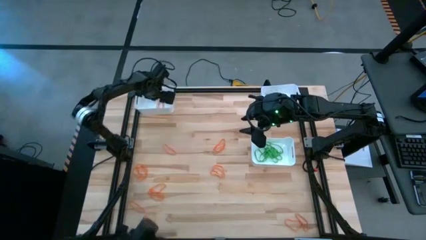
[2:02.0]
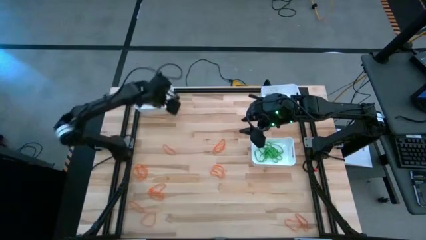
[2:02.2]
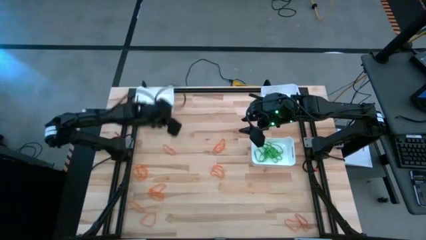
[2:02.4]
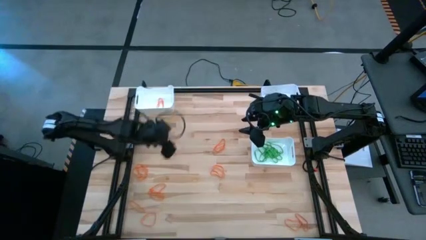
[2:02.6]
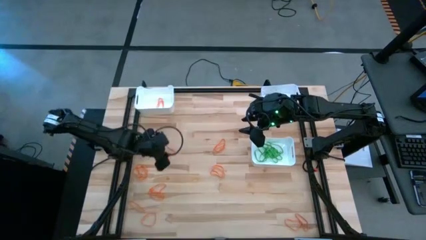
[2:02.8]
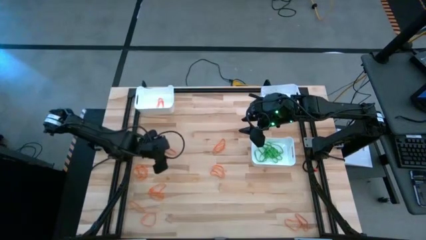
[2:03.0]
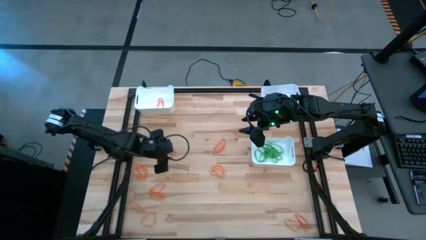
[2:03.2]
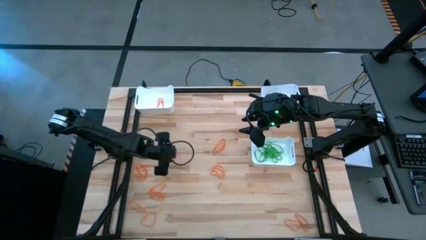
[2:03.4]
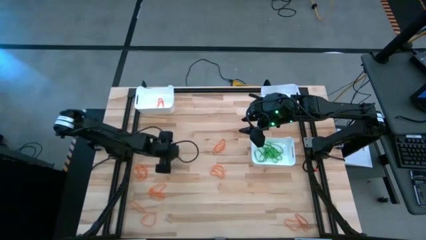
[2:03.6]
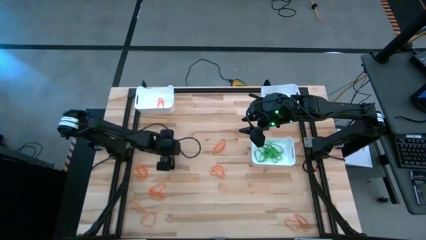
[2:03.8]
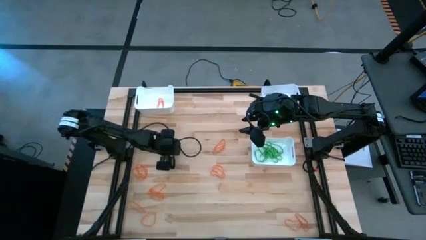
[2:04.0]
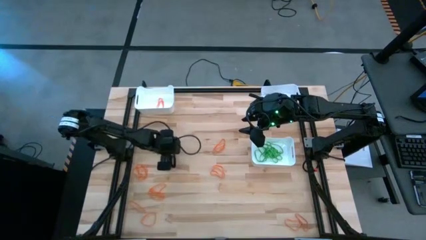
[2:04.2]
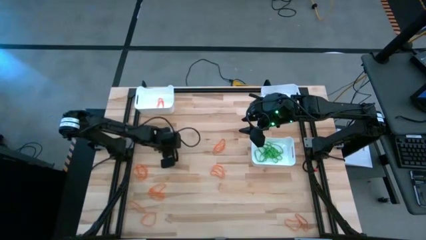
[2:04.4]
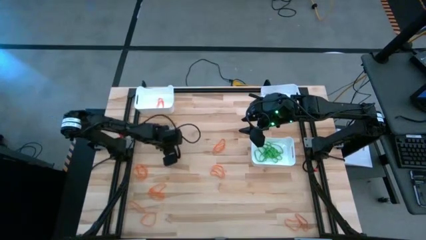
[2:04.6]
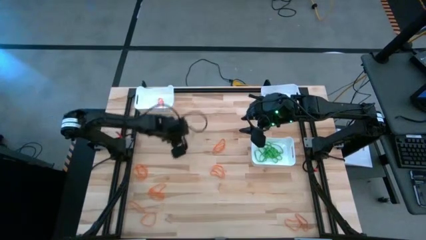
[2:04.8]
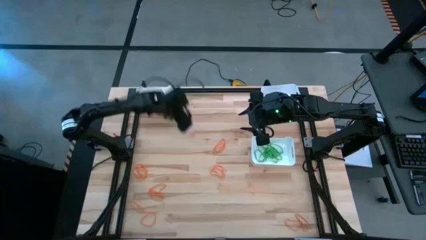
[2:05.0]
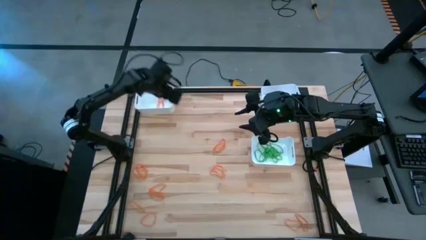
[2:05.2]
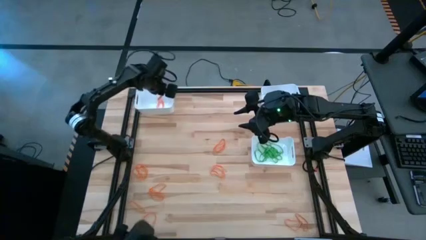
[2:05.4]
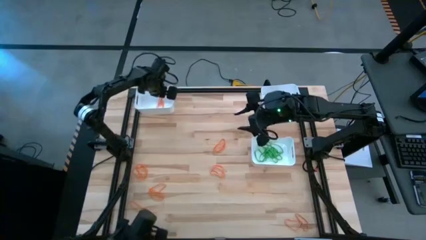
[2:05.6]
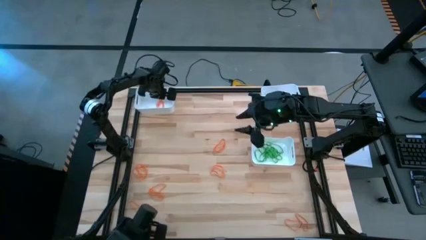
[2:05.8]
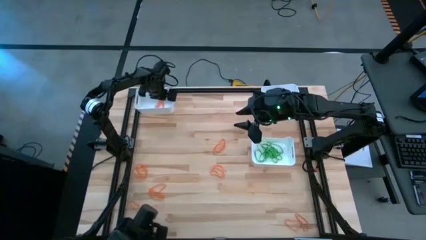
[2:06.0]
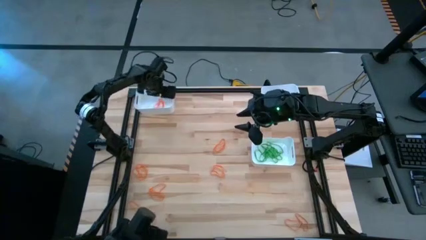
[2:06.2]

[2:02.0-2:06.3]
Task: Sort rubber bands into baskets
Put the orange rubber band into the top left white bin

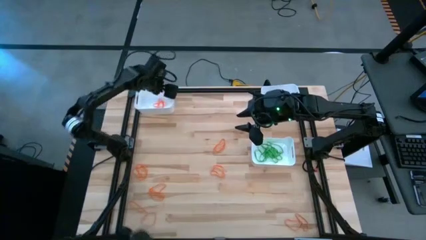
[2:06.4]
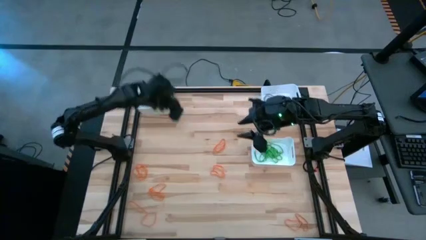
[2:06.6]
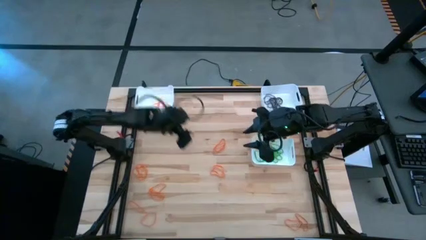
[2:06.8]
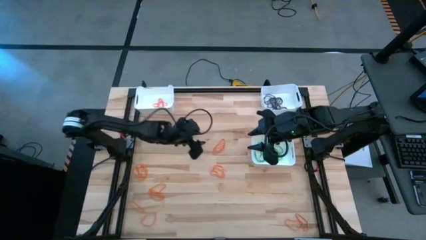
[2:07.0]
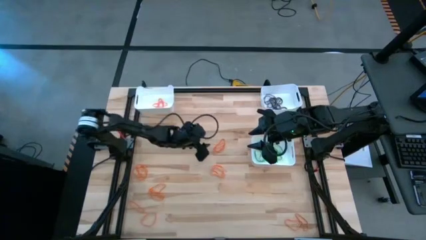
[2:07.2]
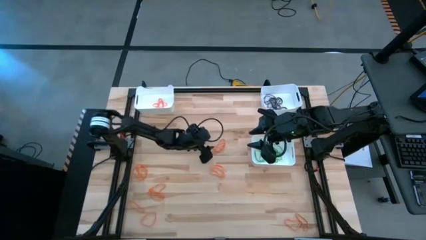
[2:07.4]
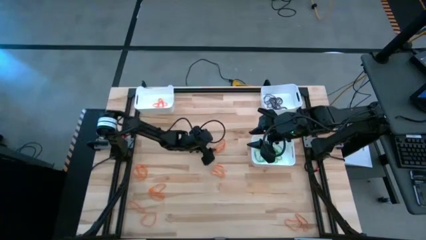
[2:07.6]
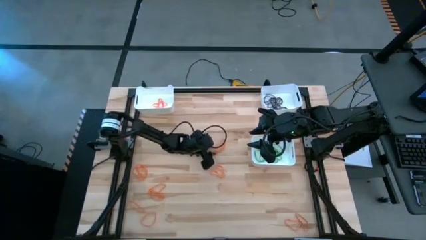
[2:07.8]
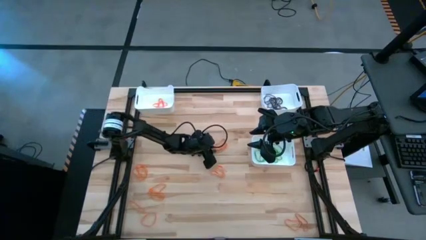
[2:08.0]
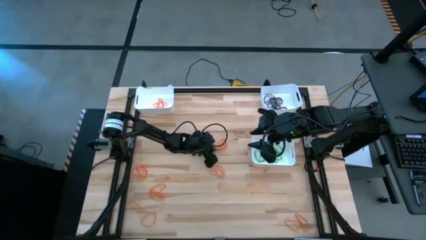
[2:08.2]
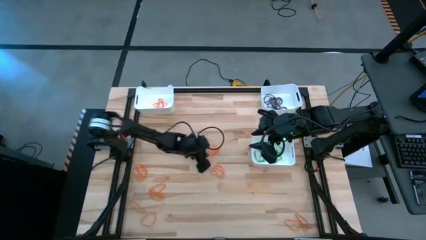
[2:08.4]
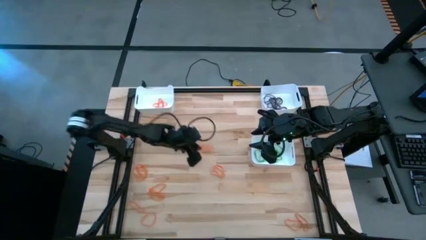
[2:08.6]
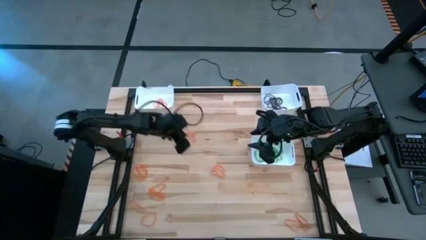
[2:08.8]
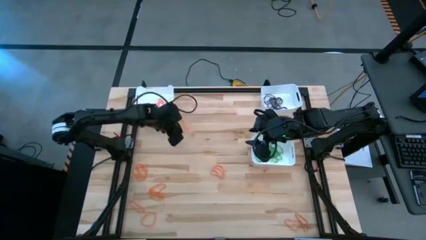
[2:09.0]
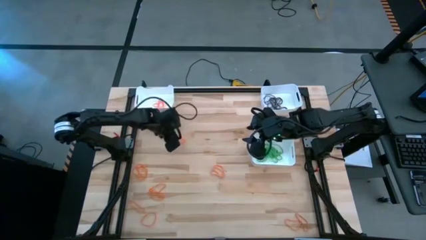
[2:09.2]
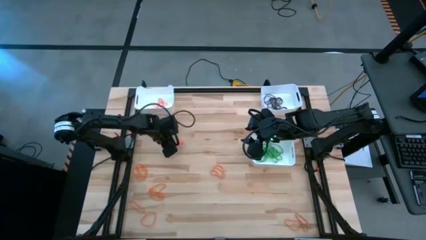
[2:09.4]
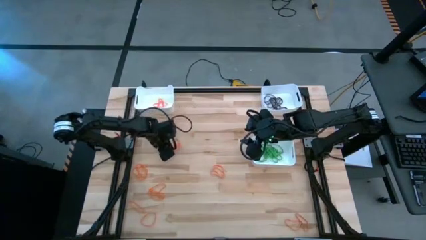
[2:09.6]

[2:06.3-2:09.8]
Put the orange rubber band into the top left white bin

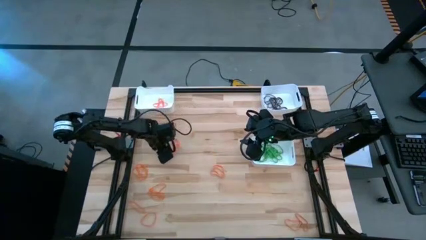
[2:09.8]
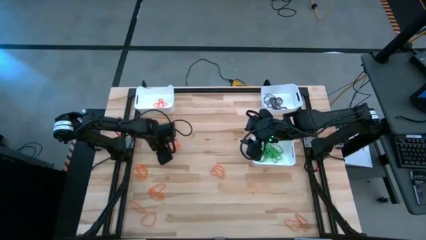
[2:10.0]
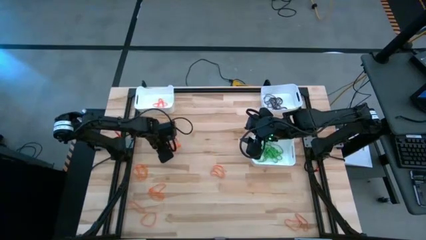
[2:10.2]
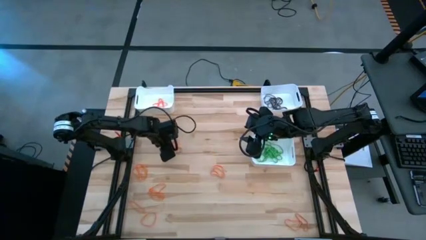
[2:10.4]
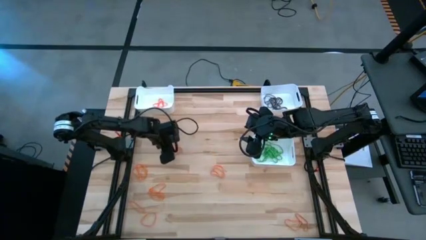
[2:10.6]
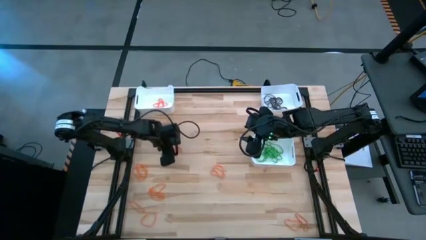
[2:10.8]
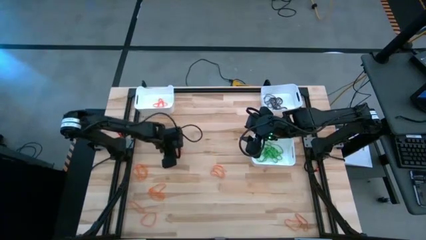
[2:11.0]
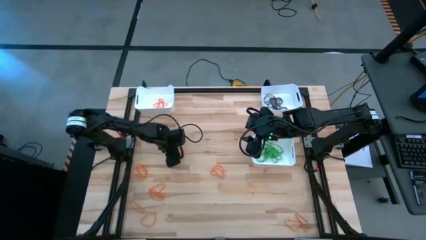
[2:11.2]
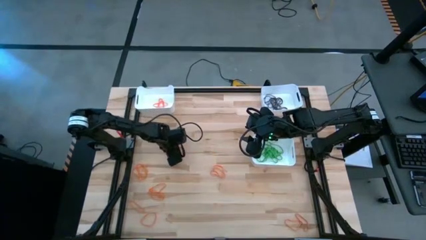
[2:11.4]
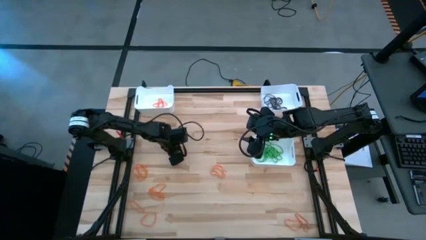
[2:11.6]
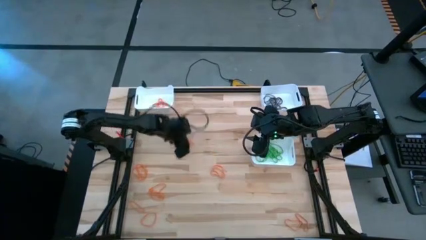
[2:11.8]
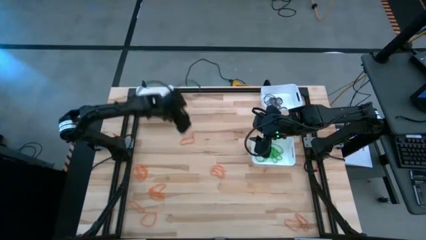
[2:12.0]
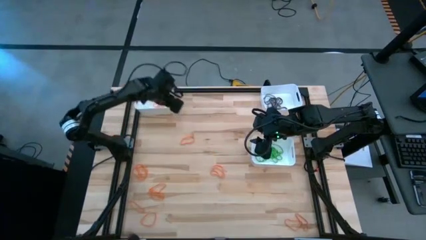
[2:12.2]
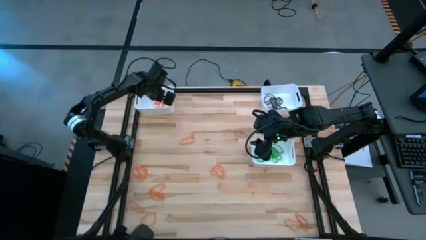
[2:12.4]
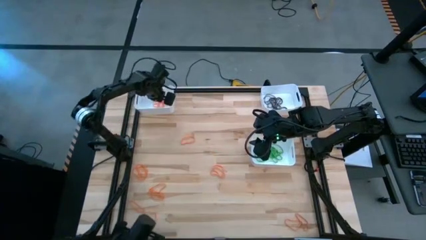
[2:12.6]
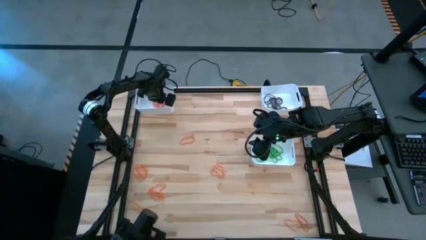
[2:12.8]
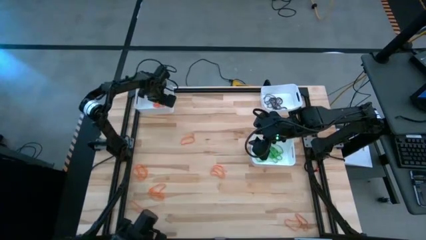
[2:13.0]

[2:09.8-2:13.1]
Put the orange rubber band into the top left white bin

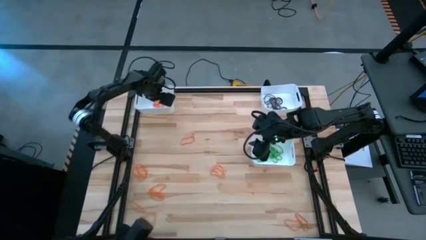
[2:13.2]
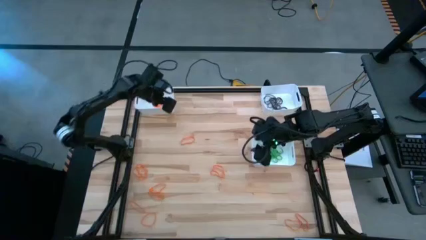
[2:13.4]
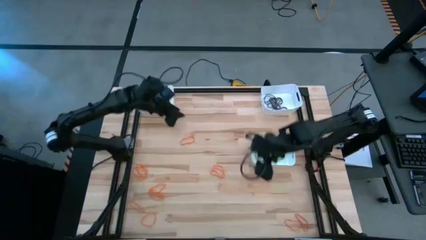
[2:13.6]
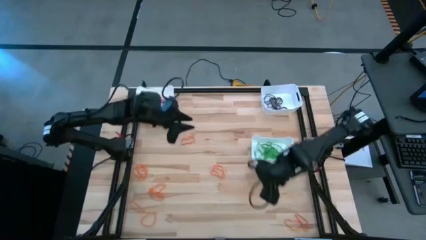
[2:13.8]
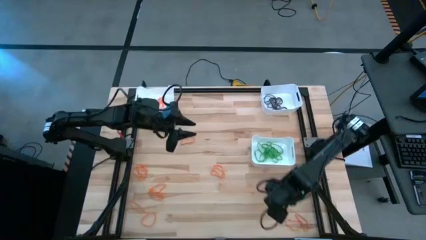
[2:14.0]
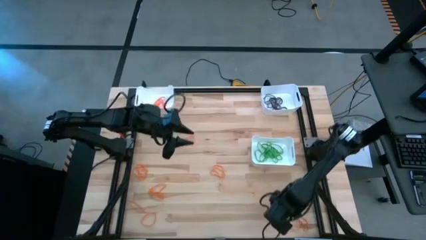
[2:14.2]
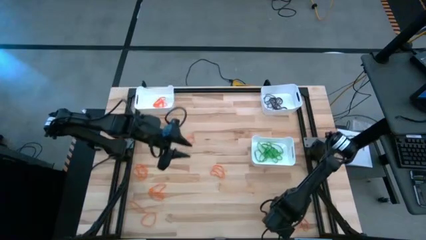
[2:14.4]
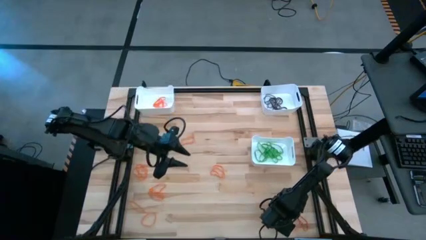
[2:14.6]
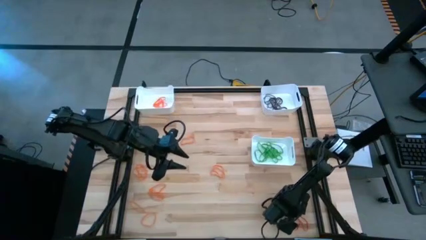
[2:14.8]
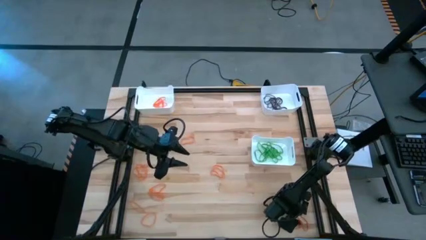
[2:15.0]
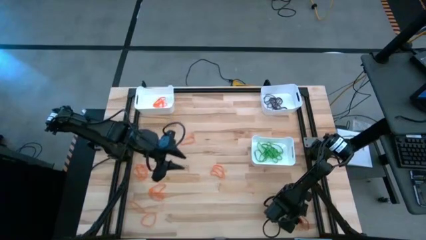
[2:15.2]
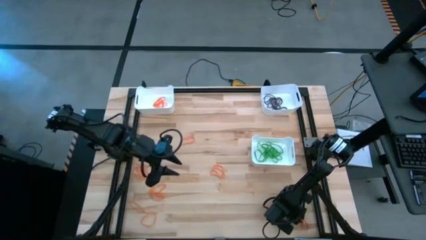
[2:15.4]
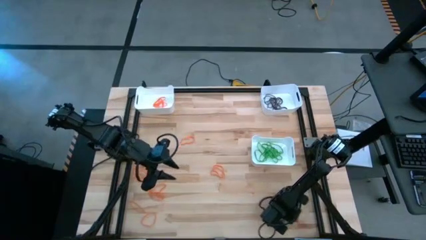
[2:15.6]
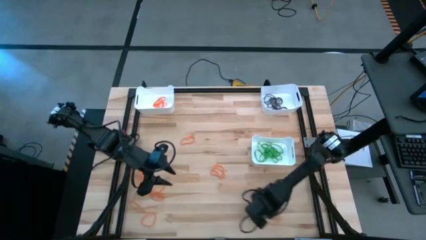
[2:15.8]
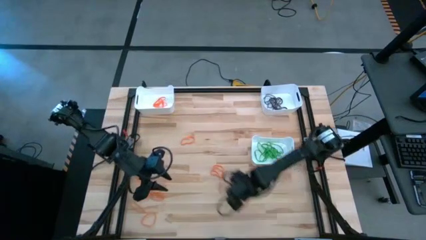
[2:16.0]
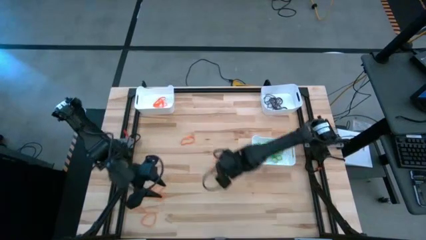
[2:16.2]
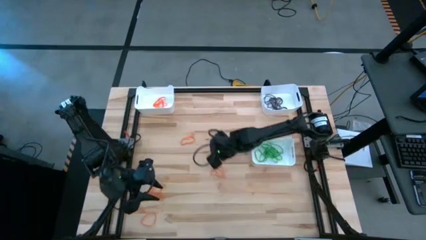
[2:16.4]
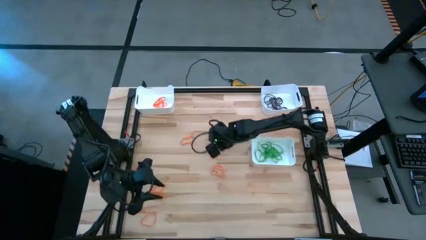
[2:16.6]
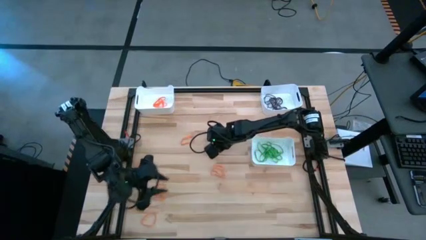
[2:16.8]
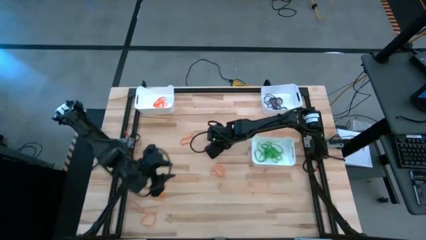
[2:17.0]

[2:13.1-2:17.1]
Put the orange rubber band into the top left white bin

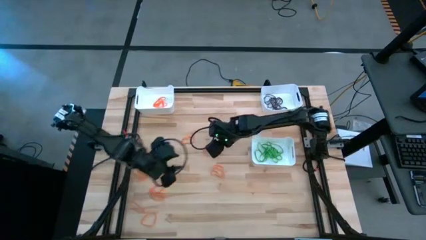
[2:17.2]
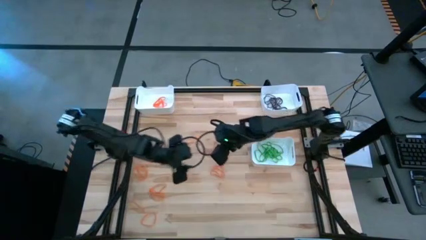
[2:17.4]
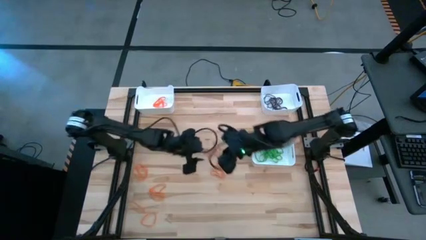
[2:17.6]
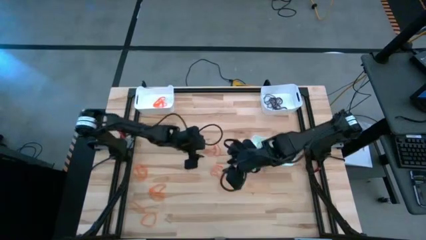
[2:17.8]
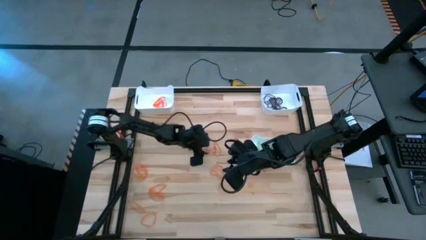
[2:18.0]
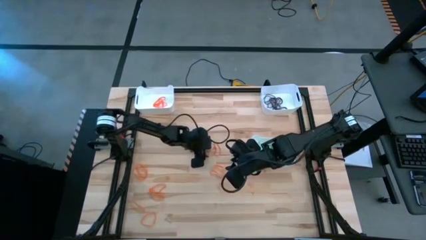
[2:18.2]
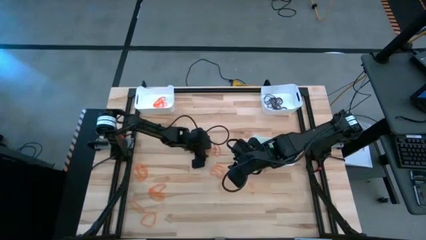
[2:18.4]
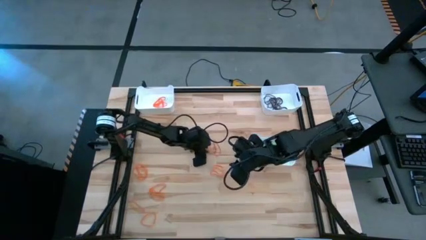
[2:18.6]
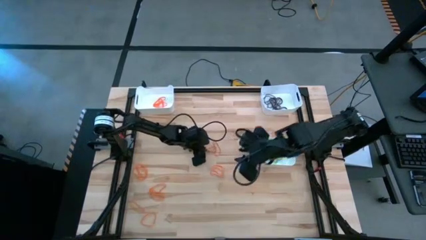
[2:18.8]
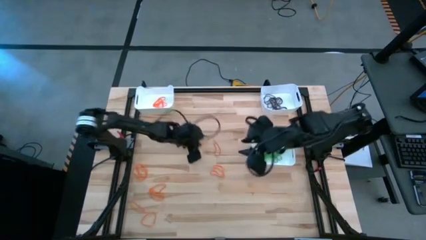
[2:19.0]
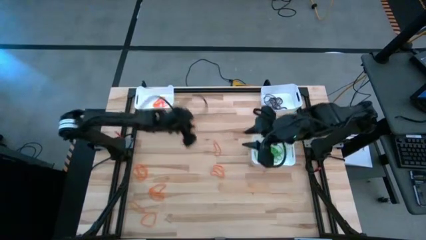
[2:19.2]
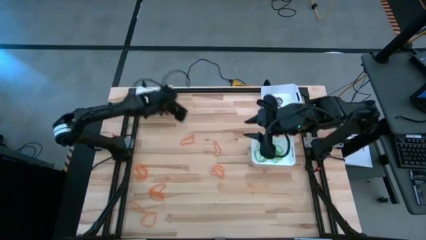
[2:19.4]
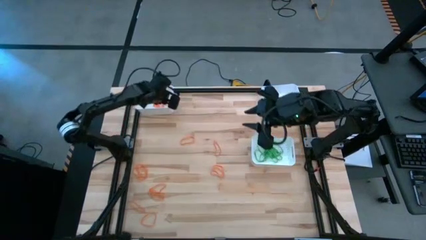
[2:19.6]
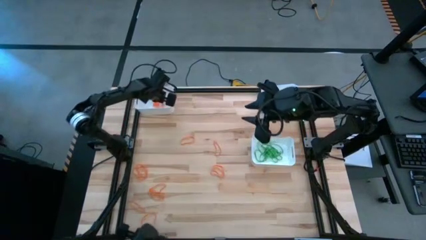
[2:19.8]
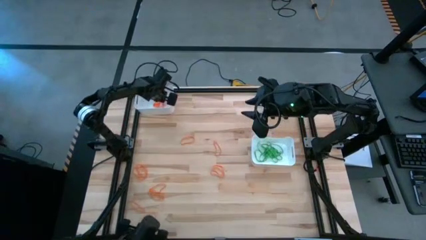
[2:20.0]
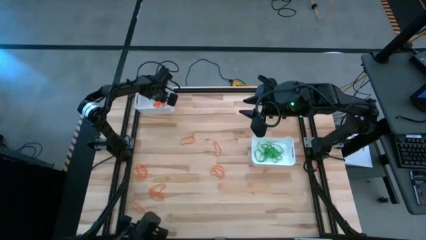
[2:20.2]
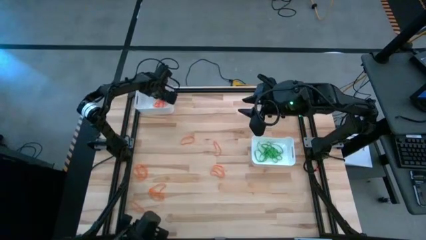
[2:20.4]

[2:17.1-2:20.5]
Put the orange rubber band into the top left white bin
